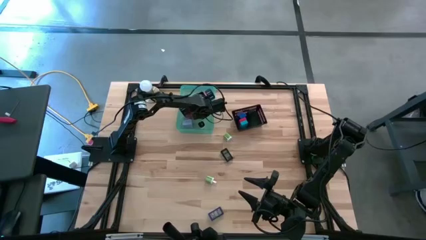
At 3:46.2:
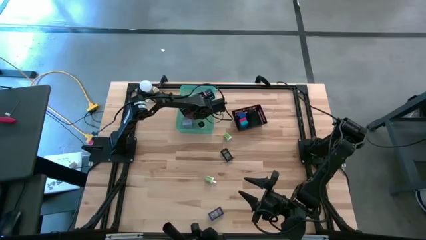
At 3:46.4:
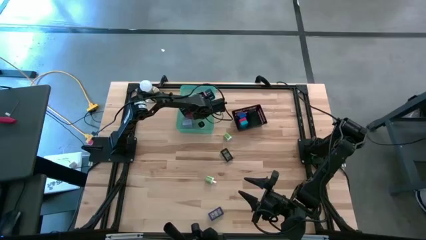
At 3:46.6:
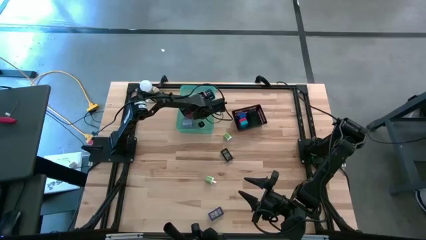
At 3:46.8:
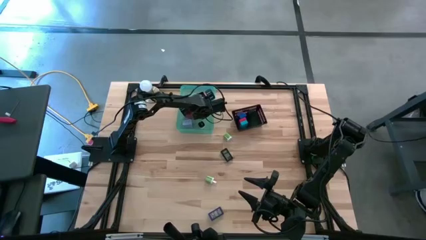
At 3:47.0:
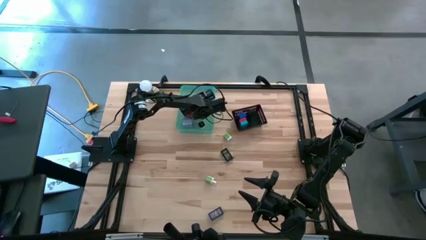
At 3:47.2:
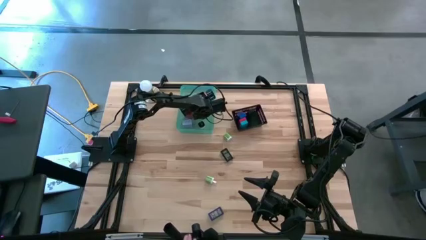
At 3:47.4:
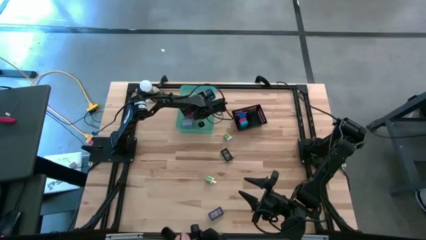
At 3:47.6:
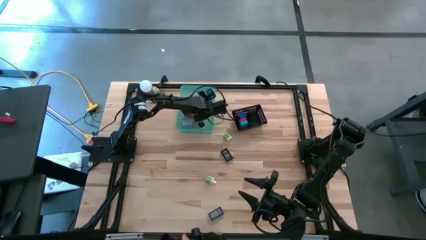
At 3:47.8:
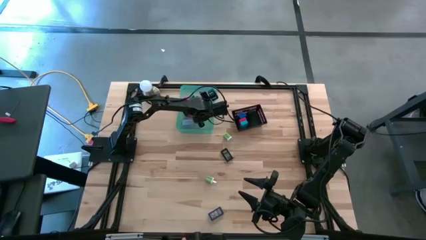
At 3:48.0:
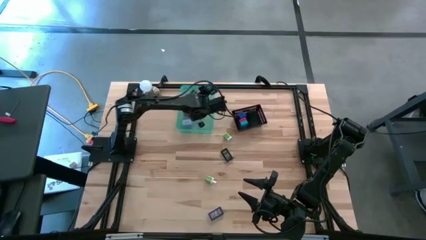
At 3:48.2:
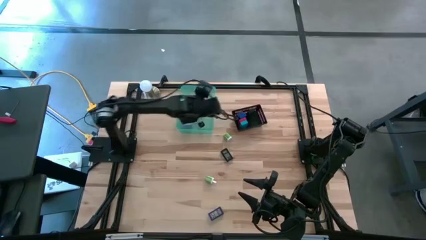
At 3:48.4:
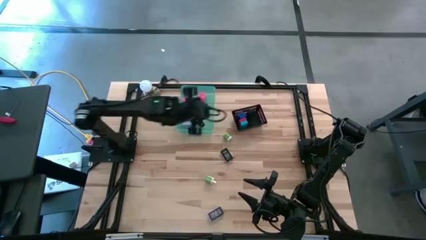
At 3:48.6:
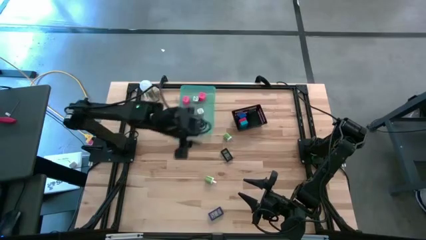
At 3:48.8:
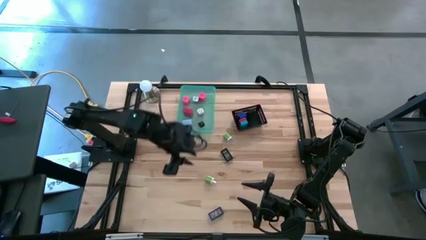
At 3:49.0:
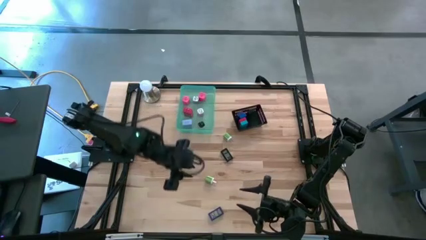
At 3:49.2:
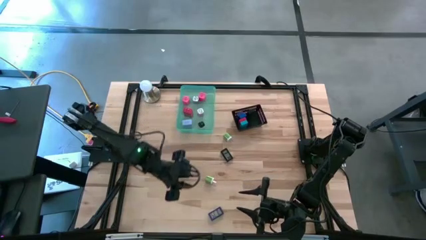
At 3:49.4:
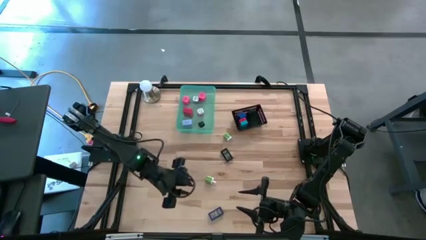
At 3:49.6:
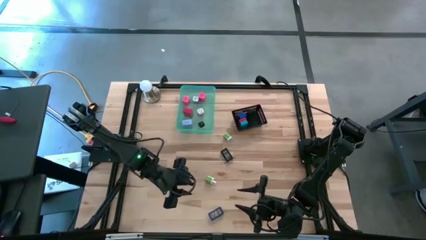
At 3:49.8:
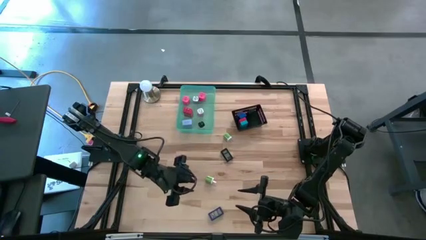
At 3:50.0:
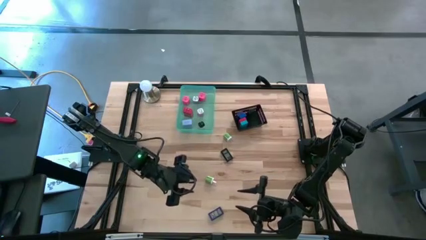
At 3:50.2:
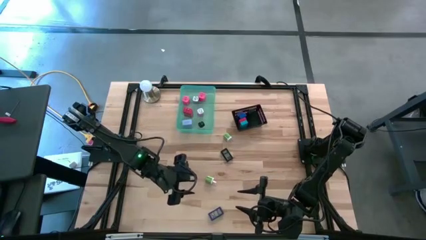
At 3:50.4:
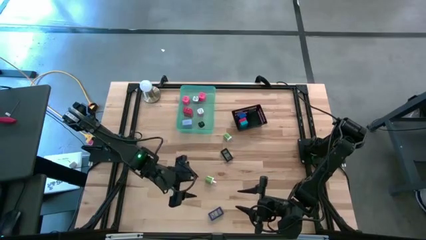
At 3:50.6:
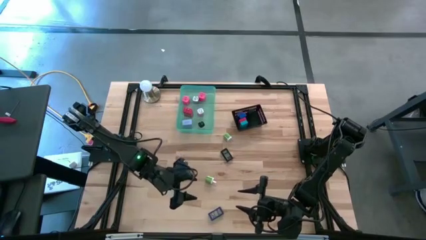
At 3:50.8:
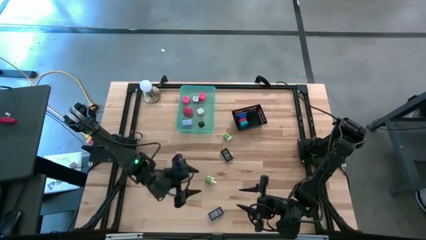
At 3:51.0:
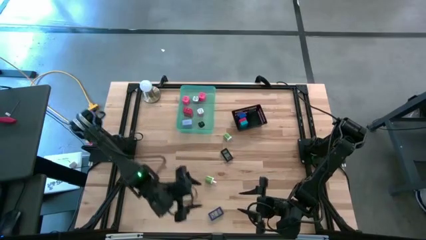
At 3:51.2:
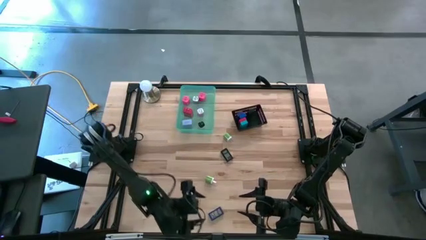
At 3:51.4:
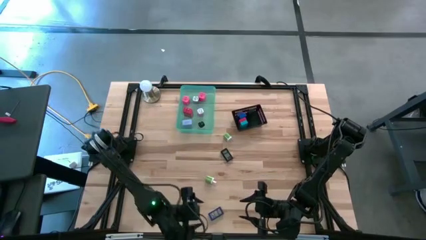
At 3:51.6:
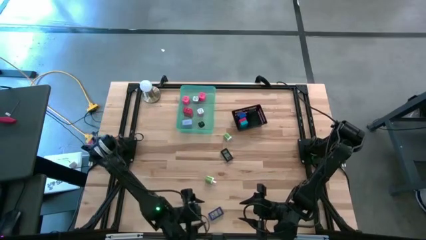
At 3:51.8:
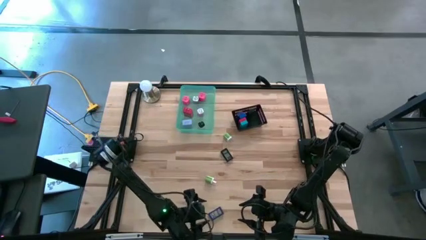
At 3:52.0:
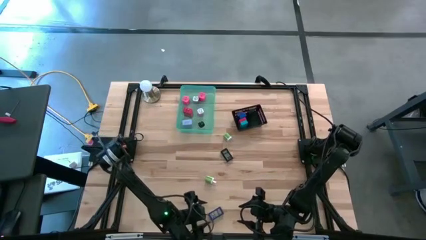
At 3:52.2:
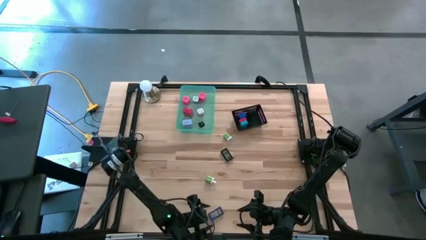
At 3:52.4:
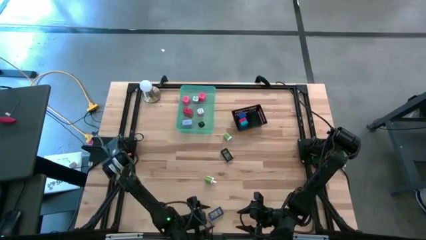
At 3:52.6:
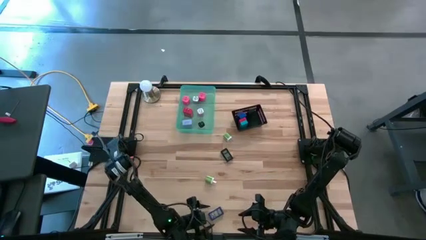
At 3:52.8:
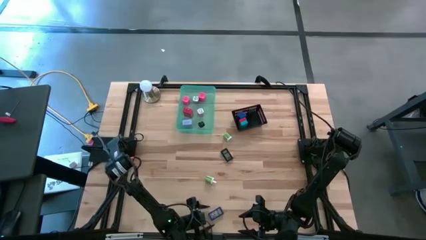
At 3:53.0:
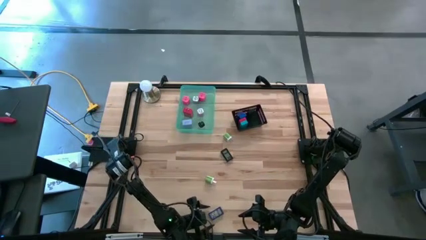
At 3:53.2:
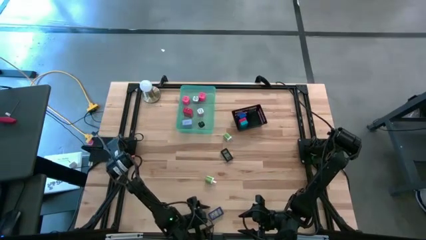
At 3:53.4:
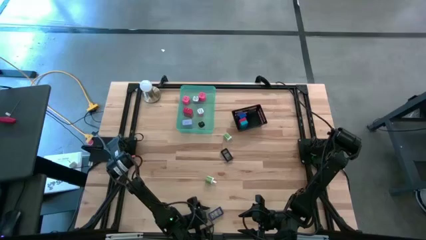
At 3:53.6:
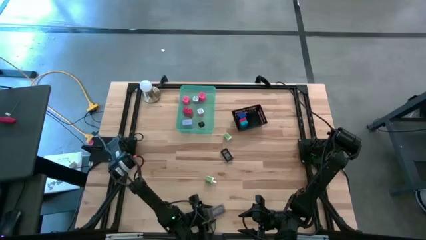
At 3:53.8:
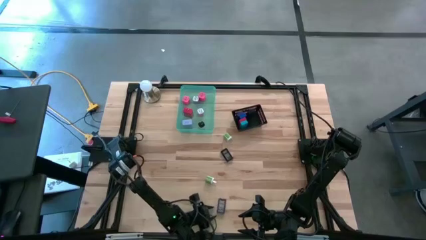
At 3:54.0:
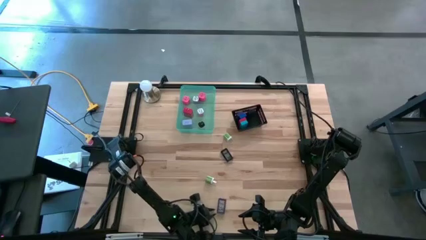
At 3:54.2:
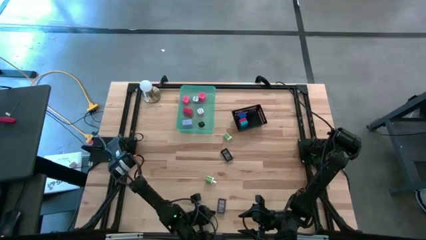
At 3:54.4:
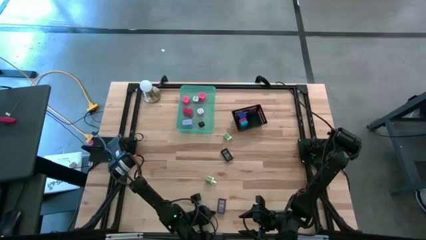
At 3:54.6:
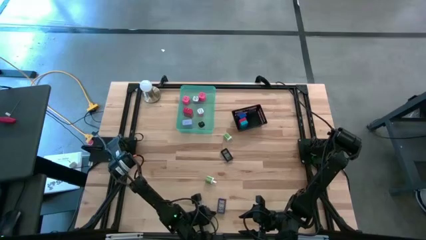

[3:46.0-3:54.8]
Task: Pick & Place Office items
Put the dark blue digital clock into the black bin

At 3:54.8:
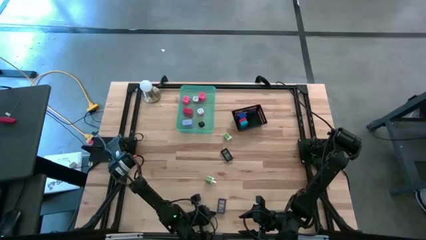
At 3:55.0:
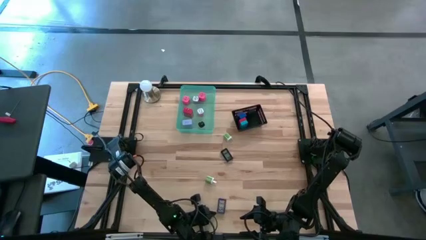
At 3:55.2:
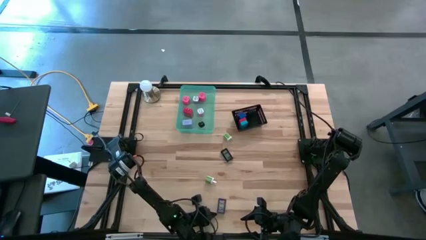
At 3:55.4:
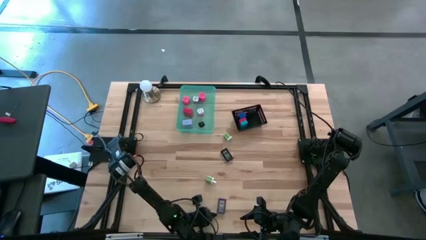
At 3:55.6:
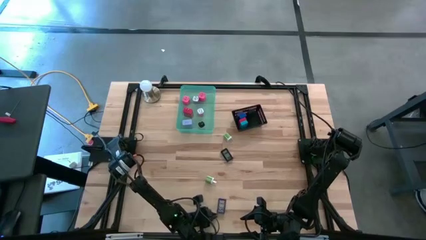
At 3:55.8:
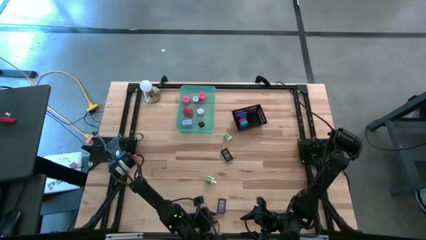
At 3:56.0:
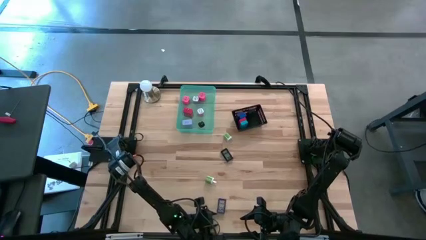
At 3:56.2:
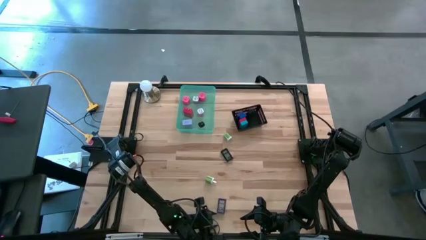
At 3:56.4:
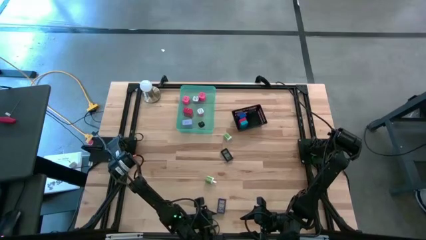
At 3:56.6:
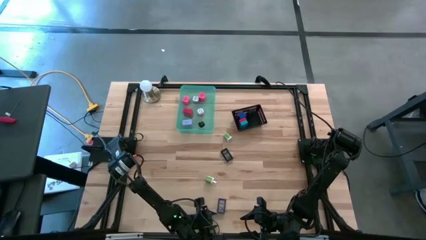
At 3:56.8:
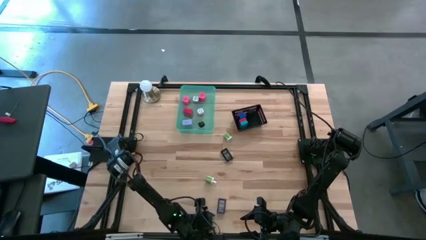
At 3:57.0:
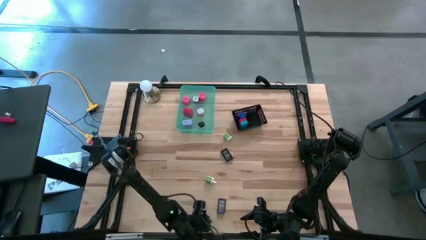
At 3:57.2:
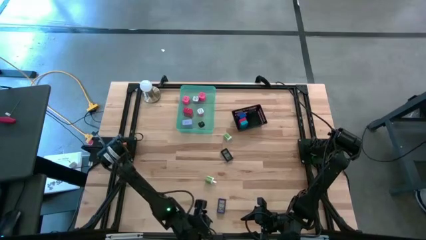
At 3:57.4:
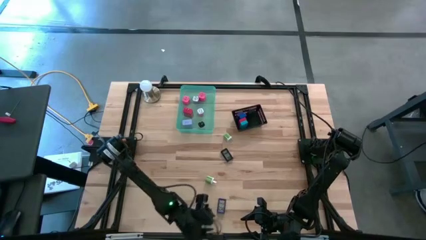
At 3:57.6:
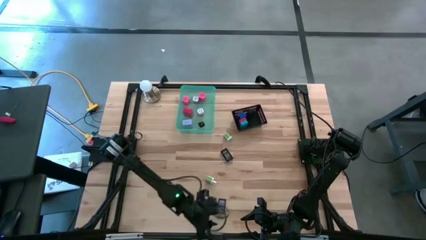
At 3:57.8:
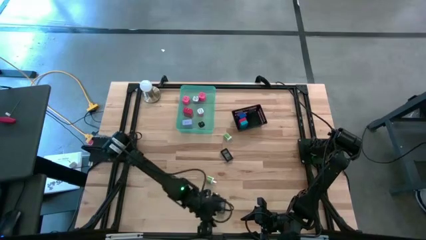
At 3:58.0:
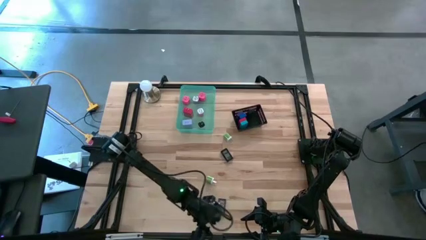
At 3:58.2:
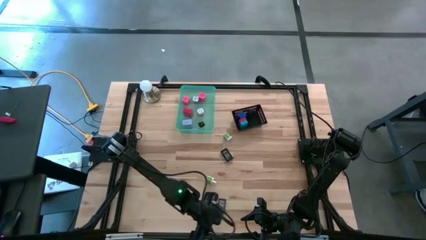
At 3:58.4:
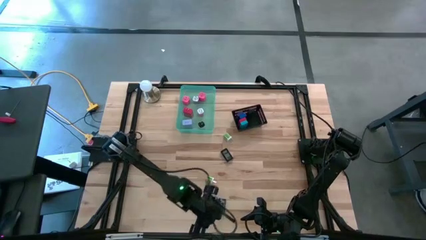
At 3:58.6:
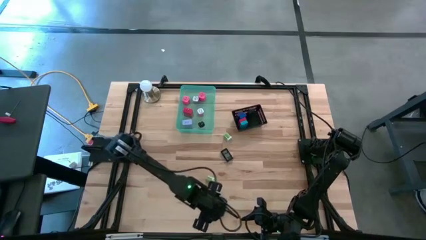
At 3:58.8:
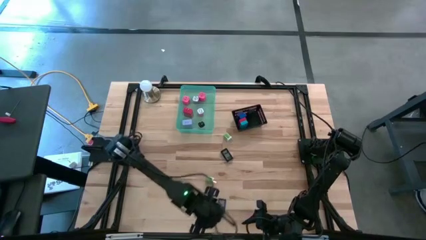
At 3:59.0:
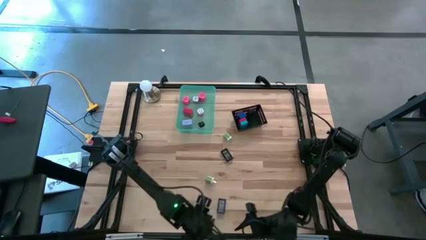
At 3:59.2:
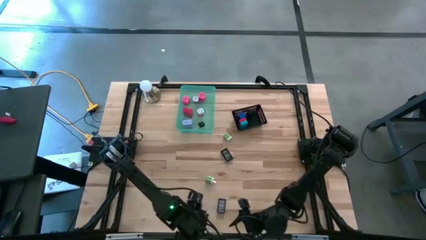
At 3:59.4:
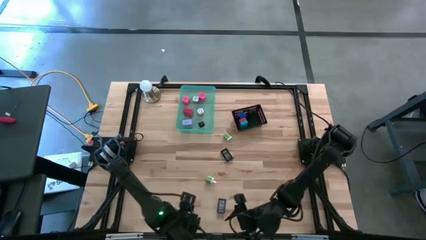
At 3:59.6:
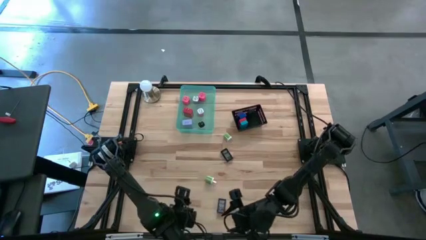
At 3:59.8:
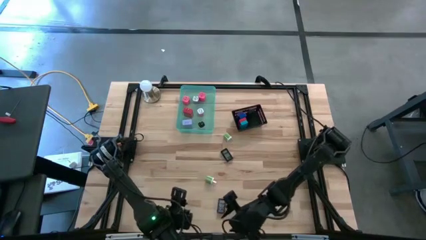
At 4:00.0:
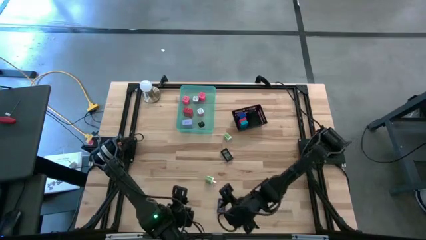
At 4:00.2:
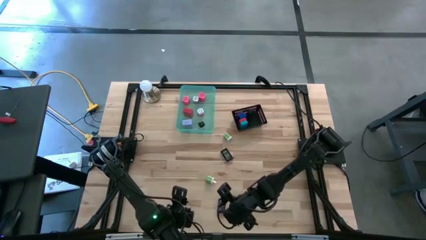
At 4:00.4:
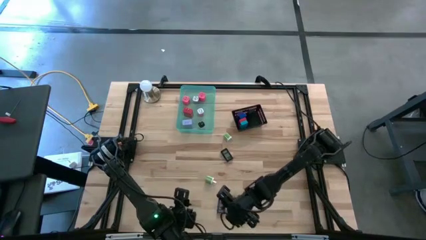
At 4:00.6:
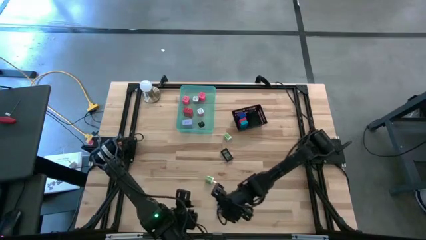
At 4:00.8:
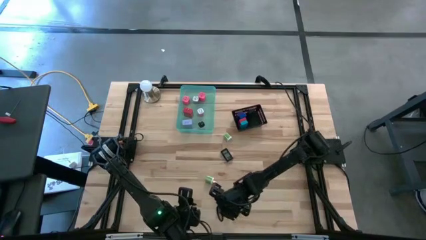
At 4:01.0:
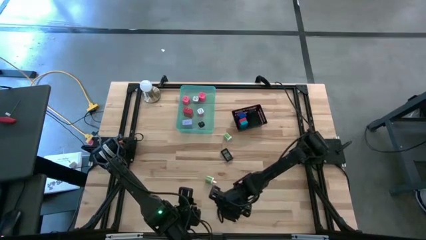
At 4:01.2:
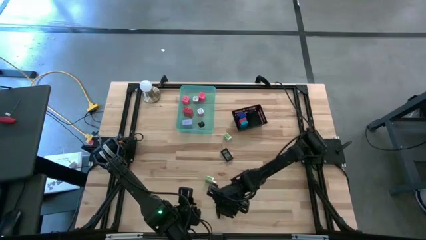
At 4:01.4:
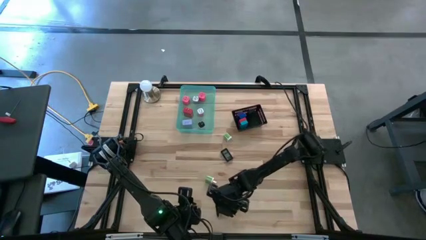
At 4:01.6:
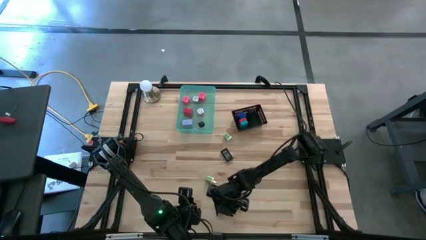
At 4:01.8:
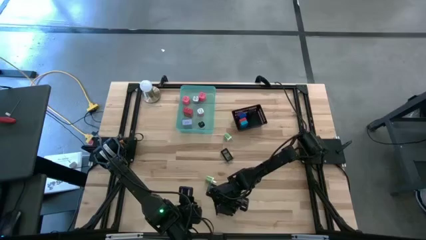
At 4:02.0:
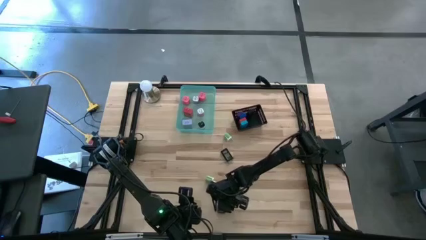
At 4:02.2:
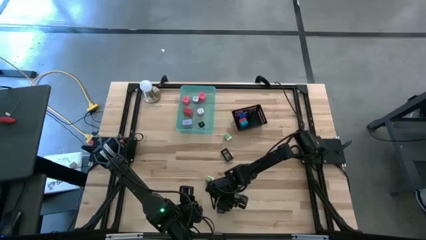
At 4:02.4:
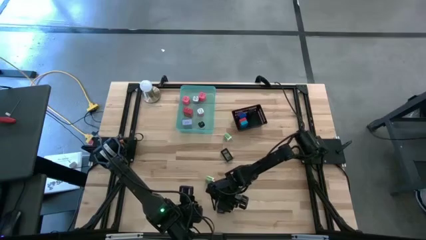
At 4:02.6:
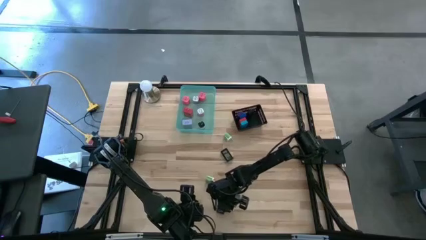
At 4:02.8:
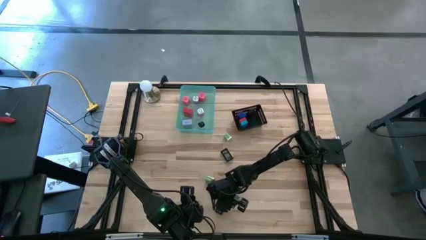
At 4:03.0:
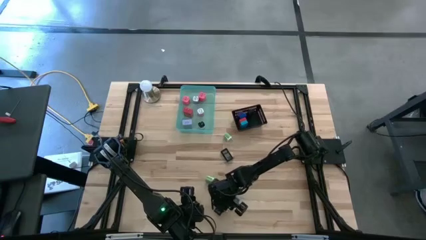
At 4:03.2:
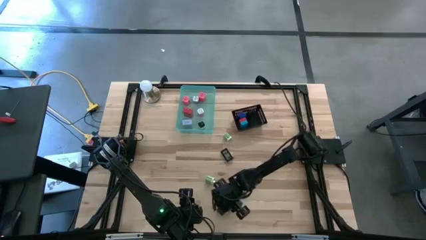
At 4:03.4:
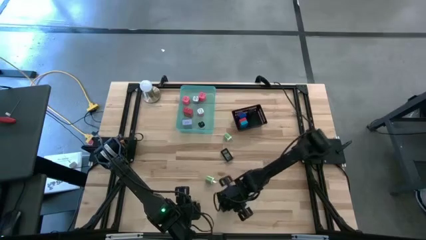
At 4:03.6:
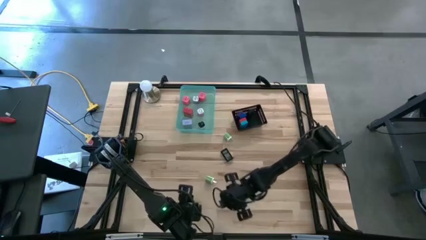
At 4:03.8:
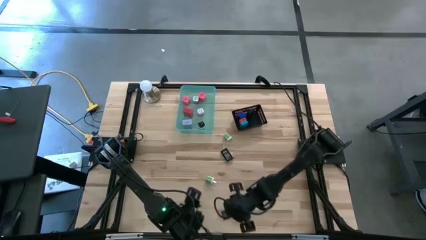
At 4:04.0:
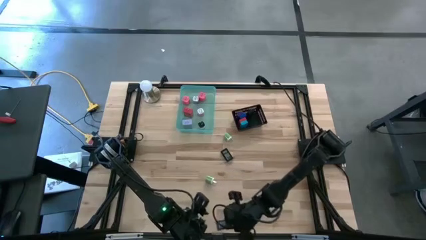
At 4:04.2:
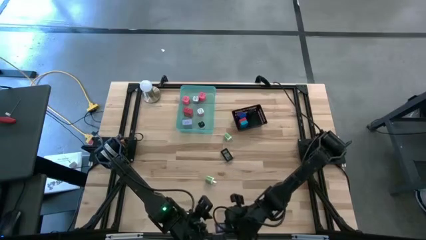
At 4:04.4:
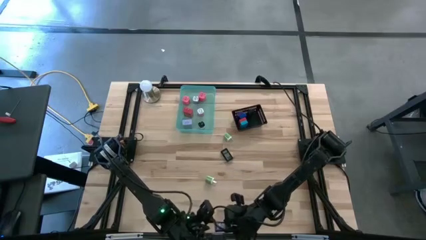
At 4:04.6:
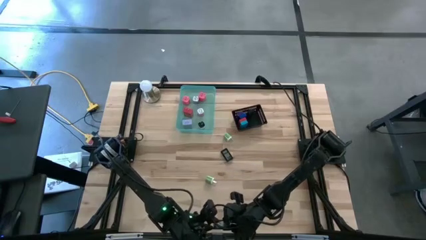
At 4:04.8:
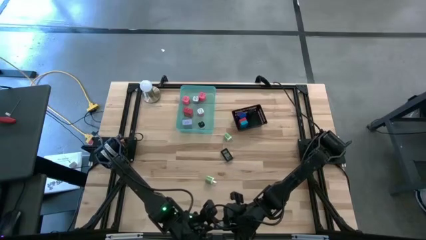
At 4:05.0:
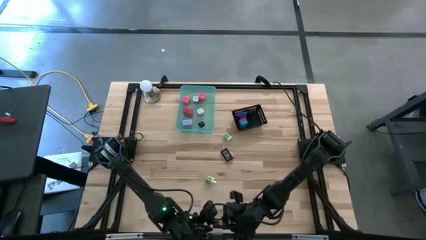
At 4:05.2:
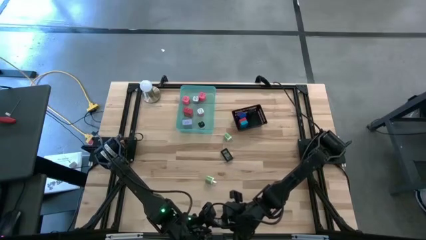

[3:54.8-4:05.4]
Put the dark blue digital clock into the black bin
